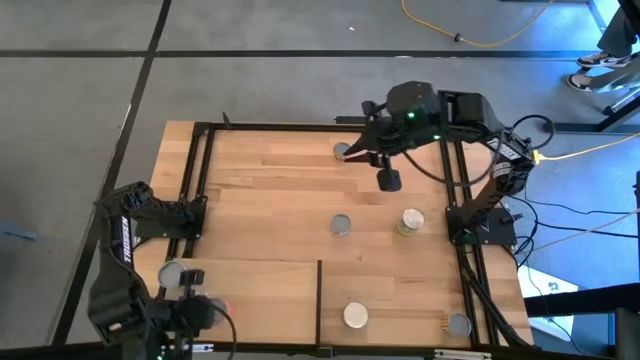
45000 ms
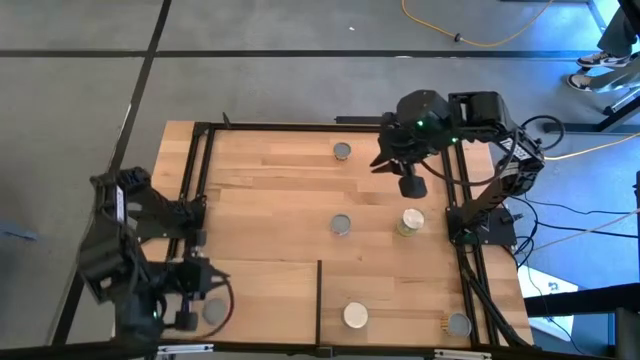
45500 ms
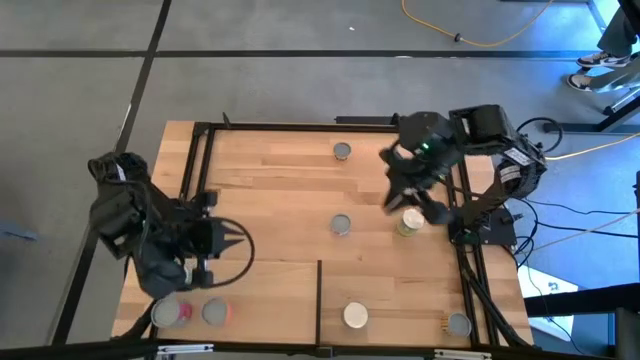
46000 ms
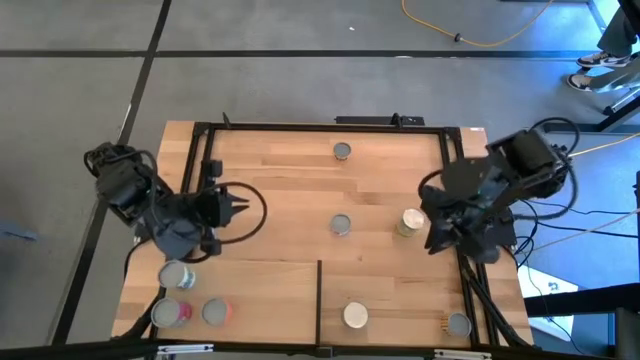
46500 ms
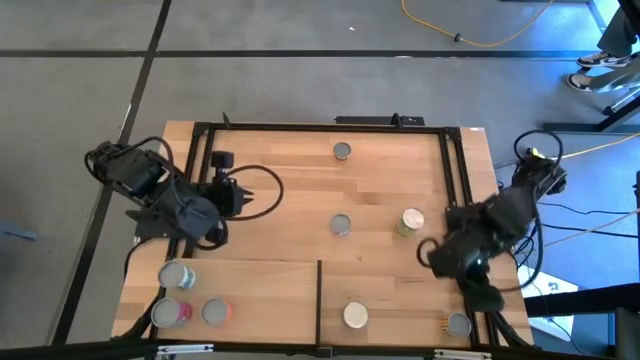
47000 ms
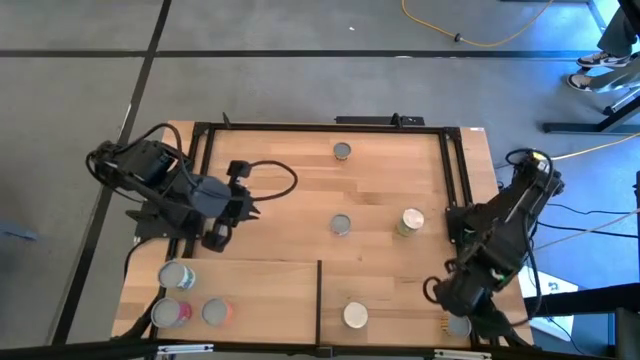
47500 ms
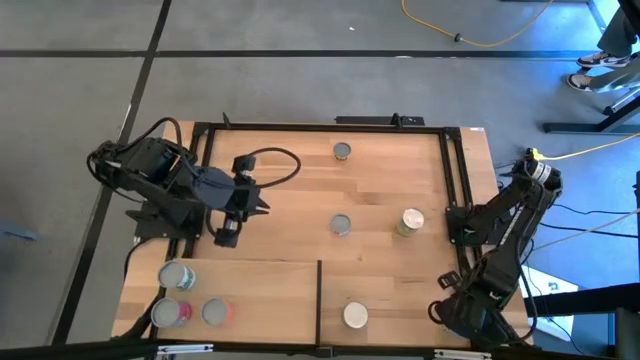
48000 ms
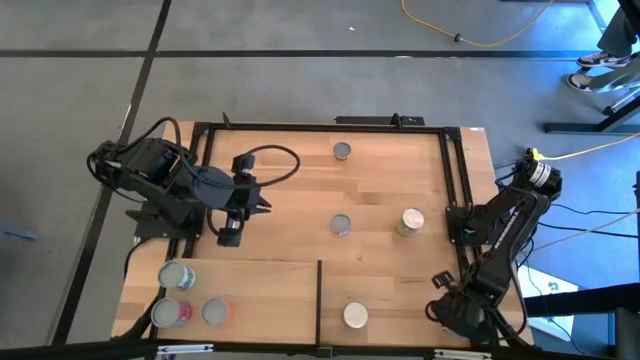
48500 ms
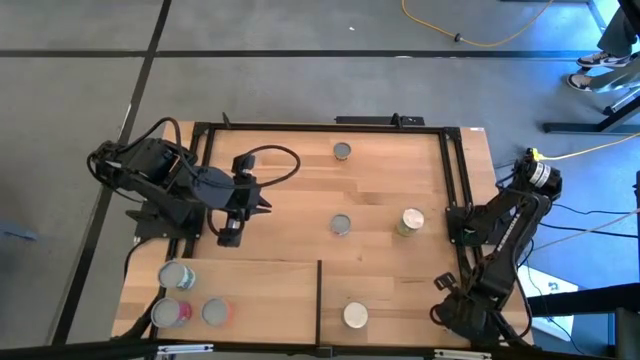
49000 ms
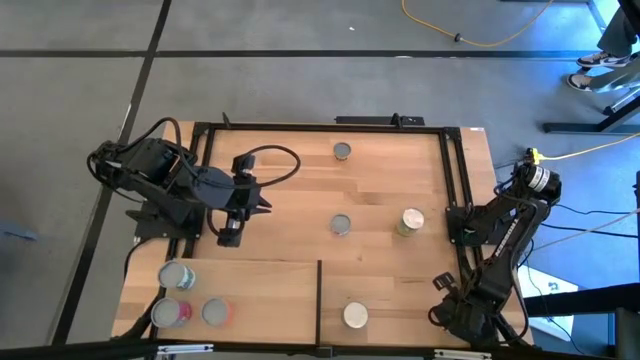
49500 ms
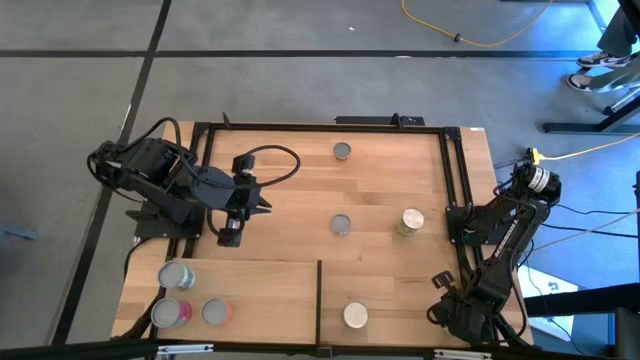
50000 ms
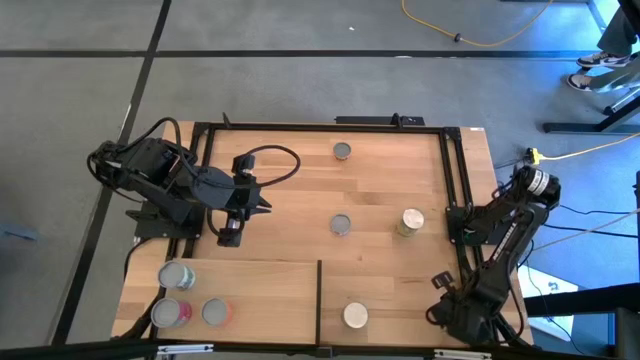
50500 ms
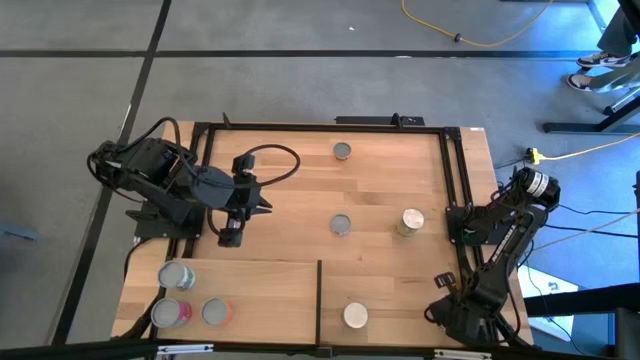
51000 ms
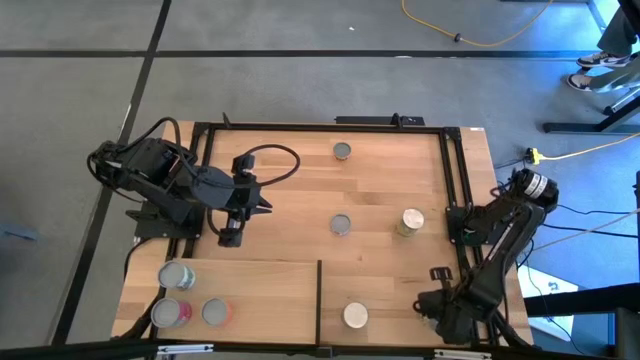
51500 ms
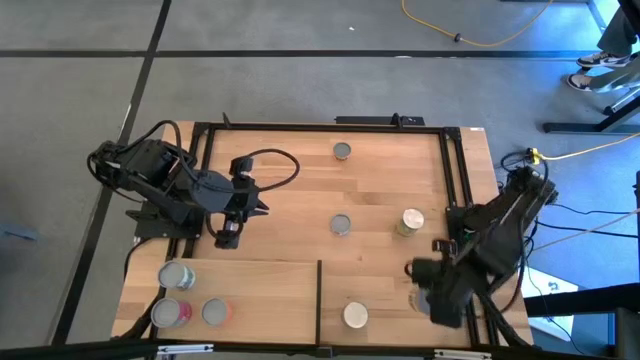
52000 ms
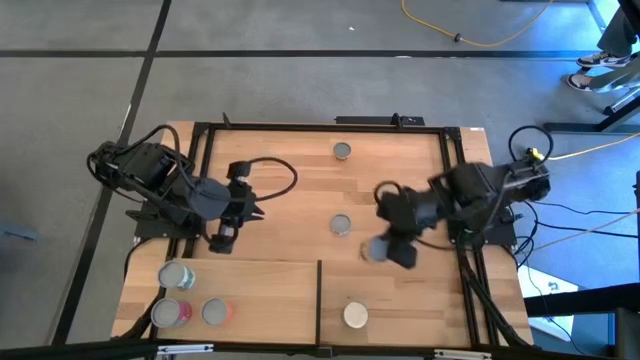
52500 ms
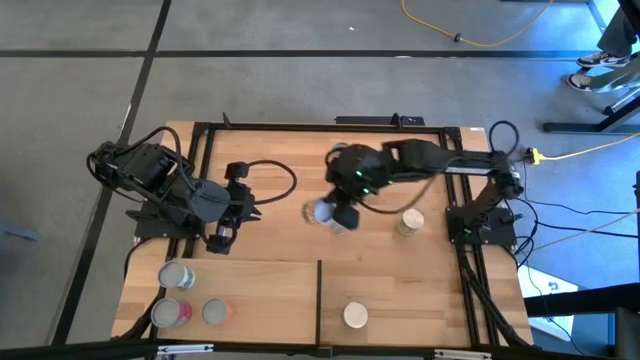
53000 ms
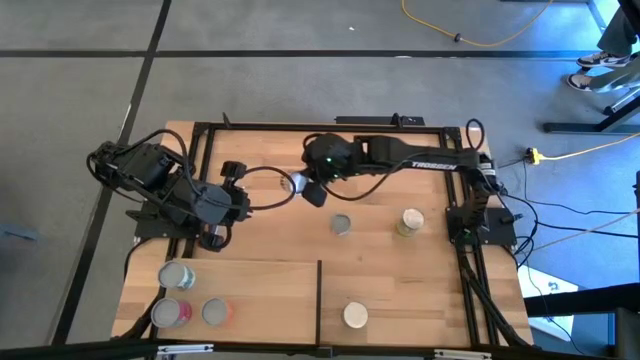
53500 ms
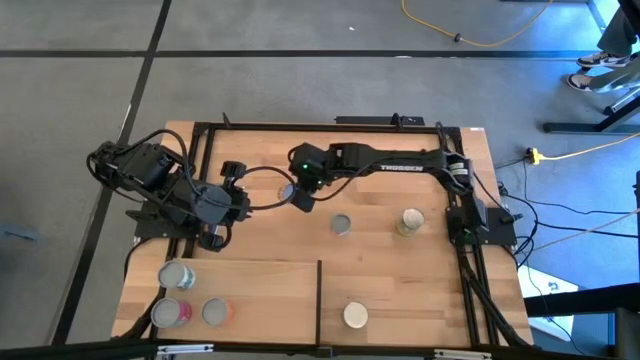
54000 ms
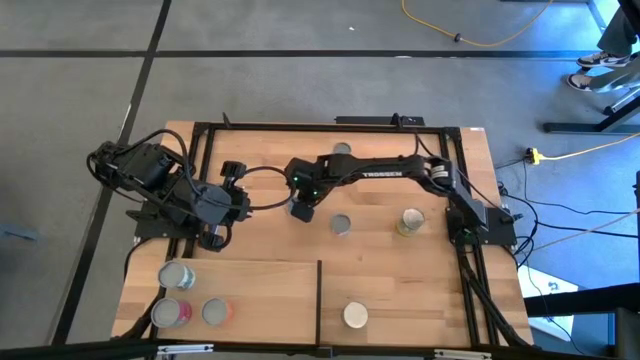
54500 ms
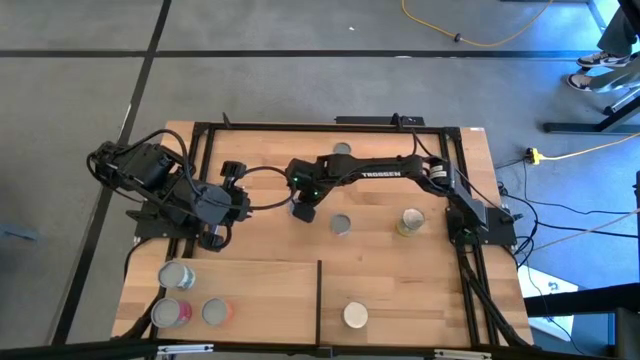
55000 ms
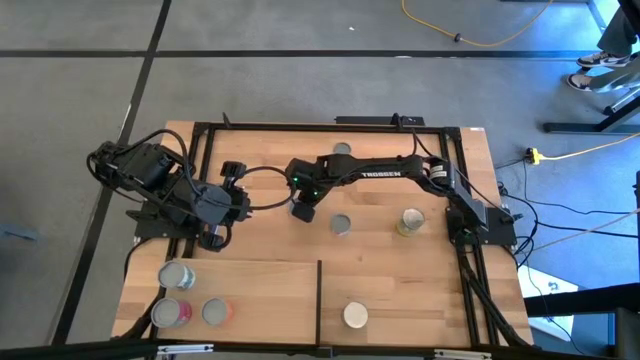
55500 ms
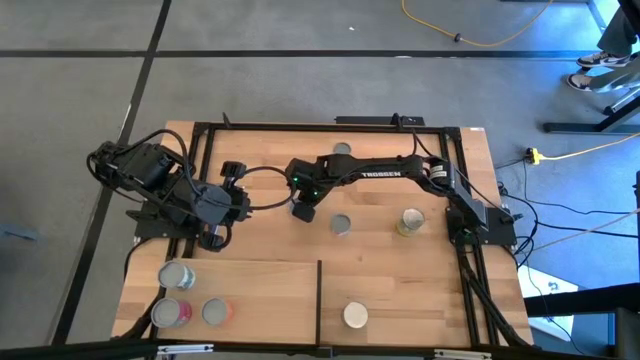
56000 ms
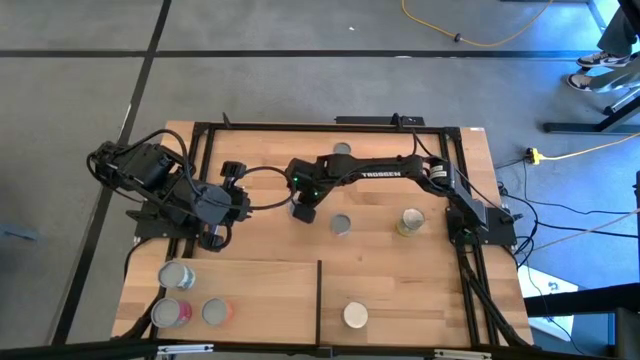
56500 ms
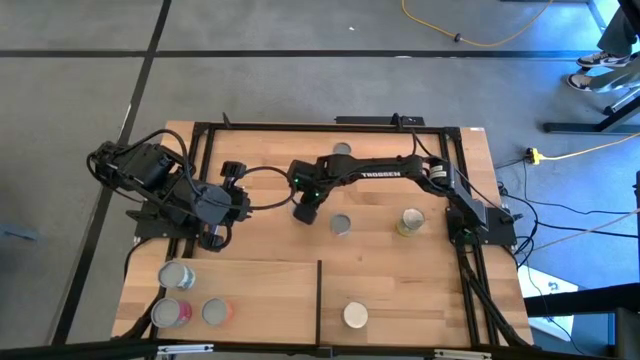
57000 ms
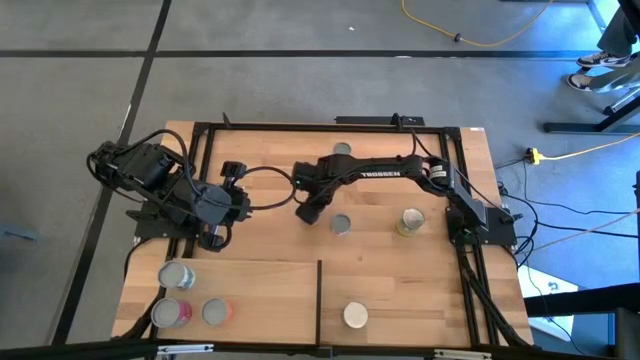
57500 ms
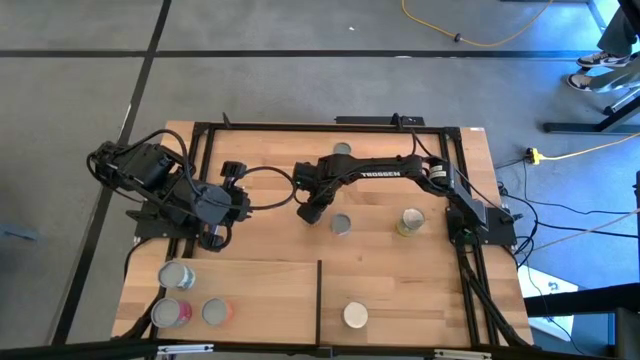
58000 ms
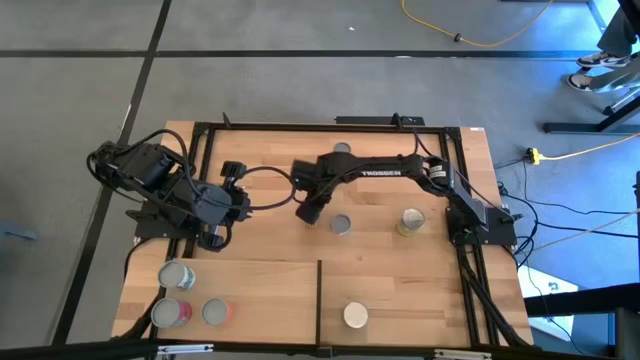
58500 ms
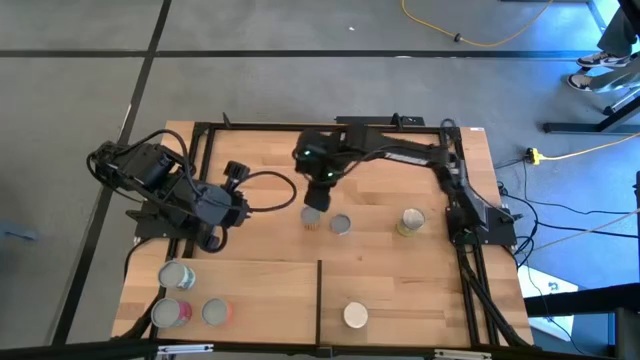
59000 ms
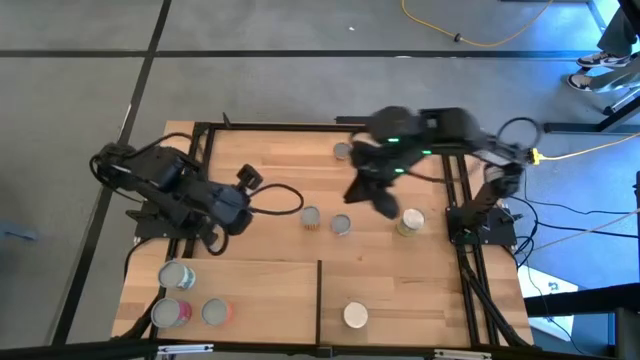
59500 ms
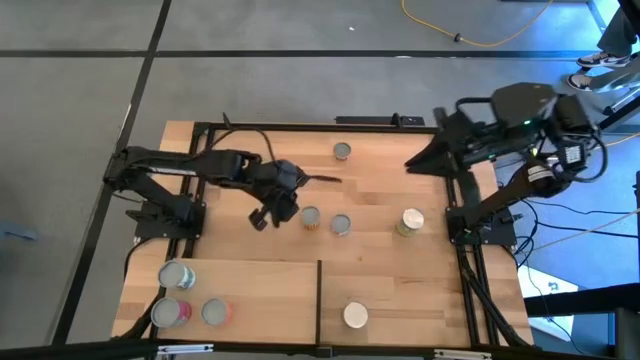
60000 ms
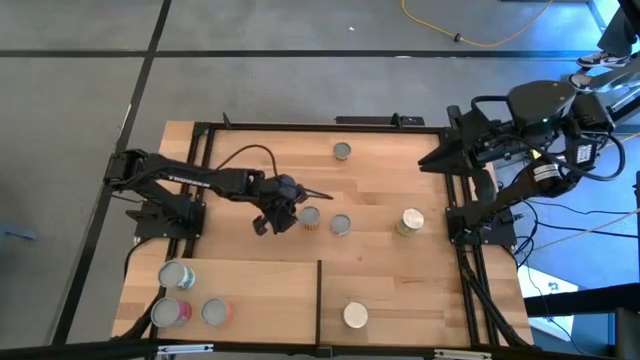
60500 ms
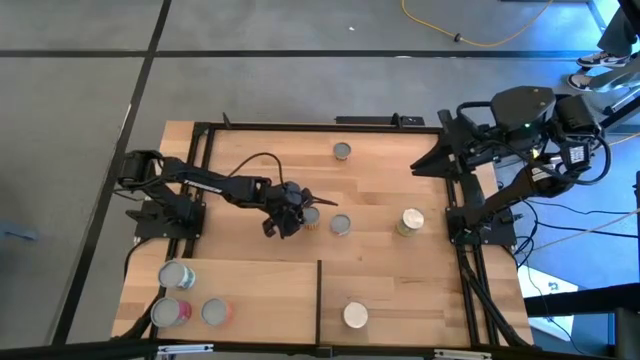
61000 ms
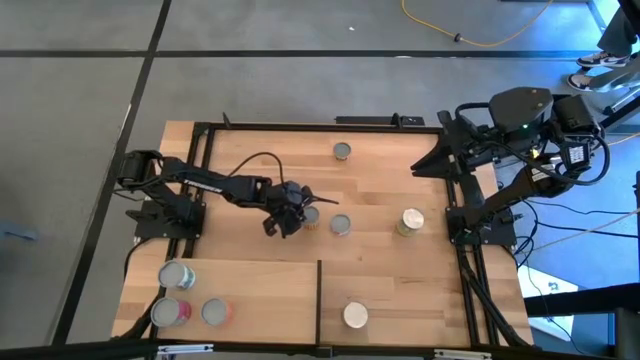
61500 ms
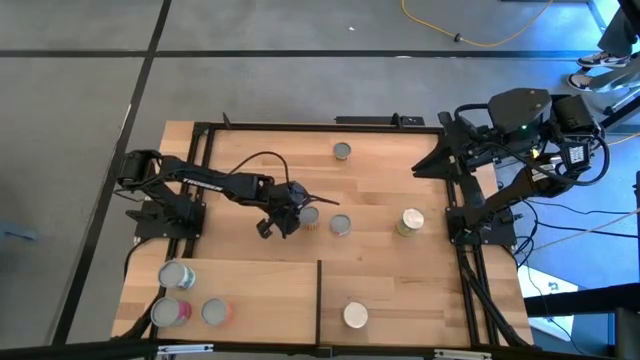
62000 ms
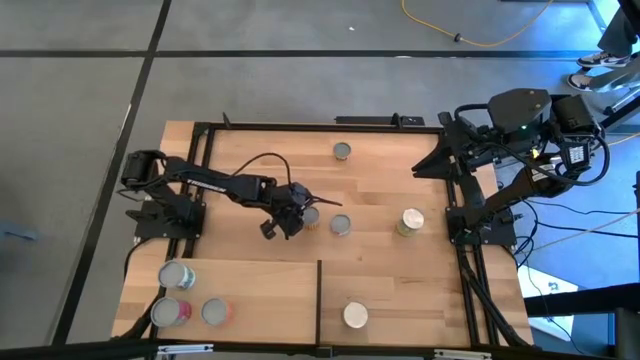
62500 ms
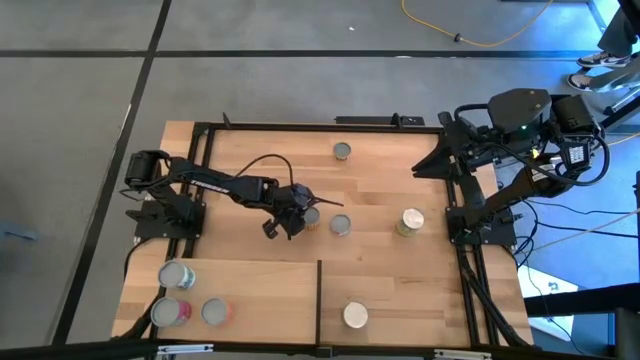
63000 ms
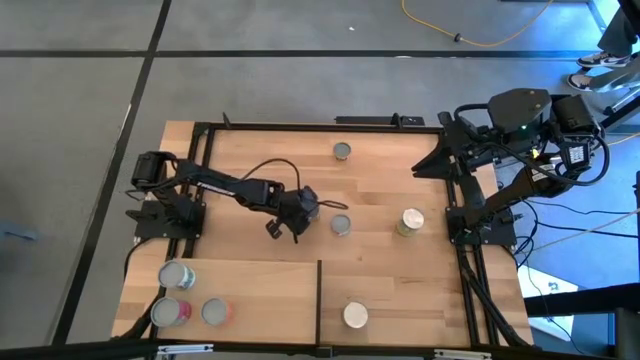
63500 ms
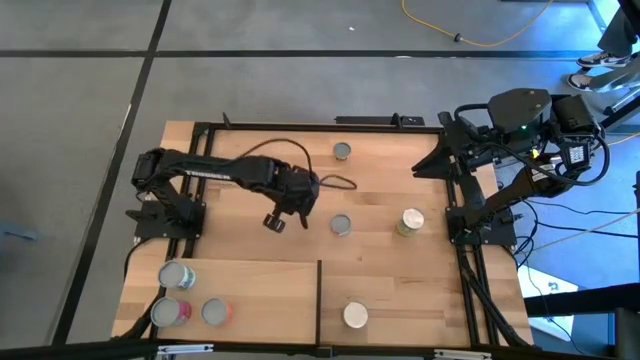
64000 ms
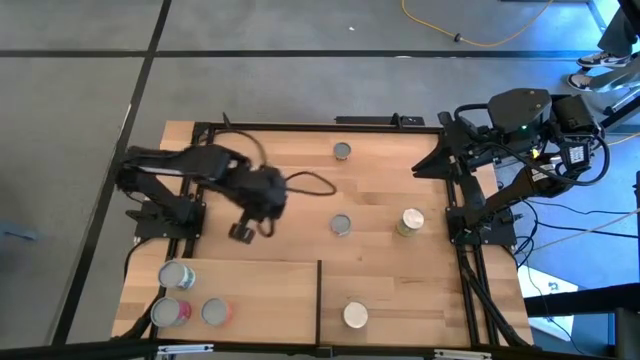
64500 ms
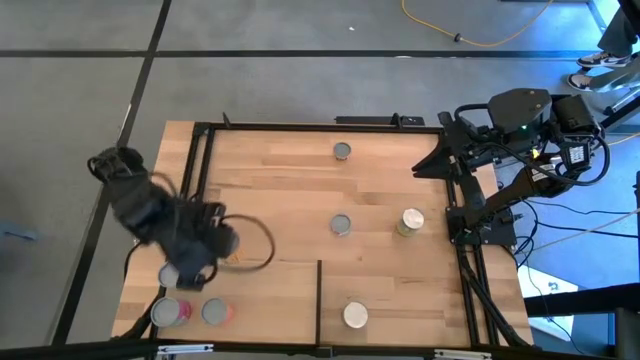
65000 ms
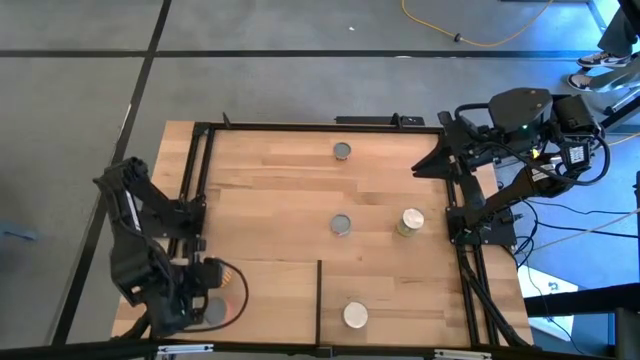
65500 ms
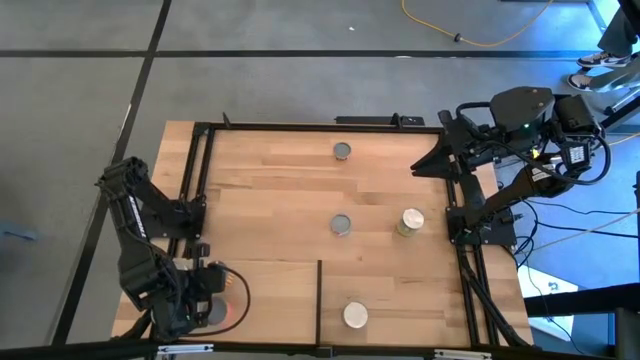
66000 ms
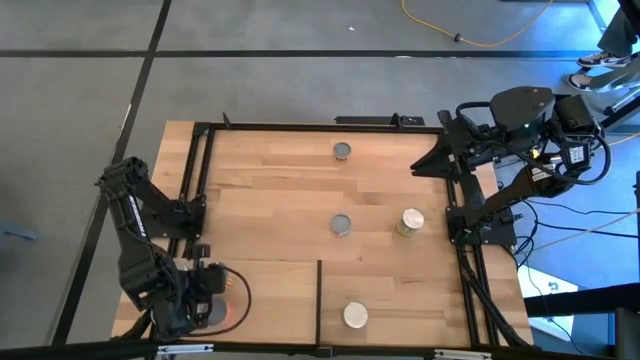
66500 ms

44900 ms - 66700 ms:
Task: Pick and place cans onto a shelf
Put the canned spicy black beans on the shelf
